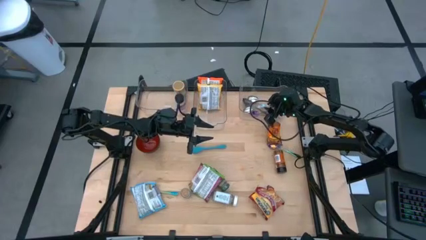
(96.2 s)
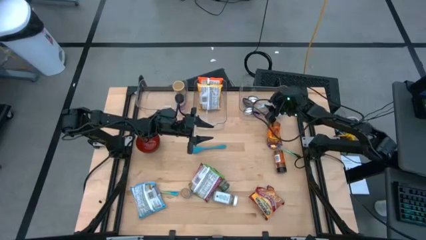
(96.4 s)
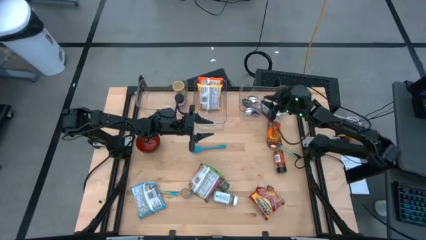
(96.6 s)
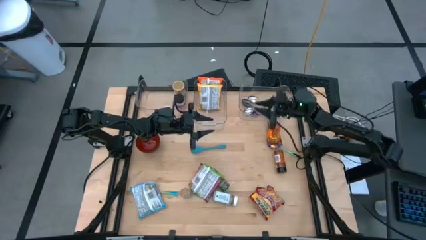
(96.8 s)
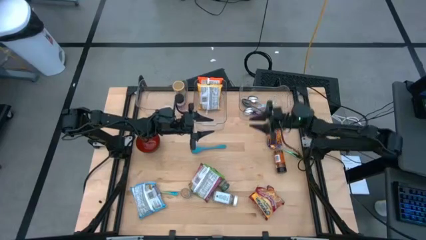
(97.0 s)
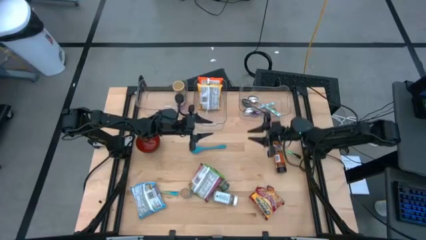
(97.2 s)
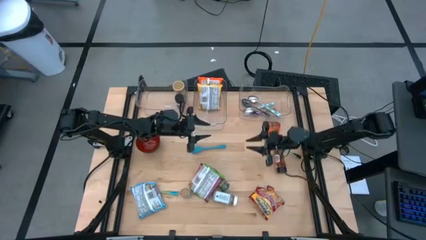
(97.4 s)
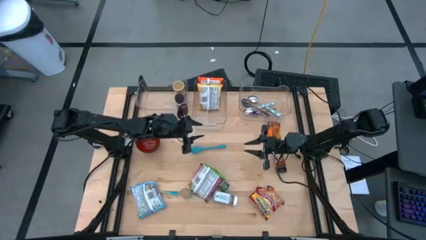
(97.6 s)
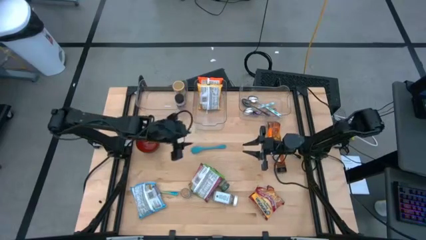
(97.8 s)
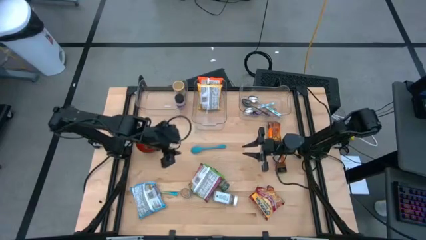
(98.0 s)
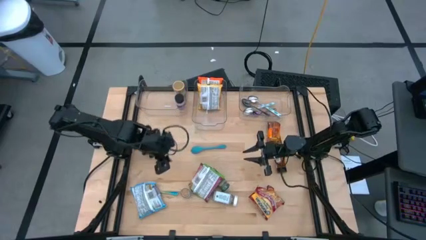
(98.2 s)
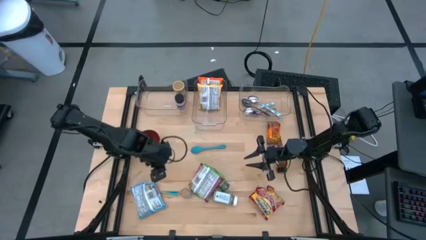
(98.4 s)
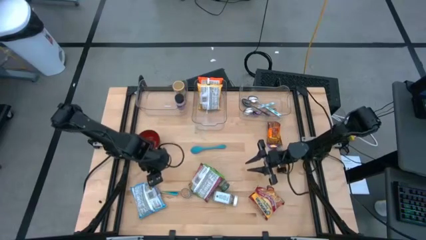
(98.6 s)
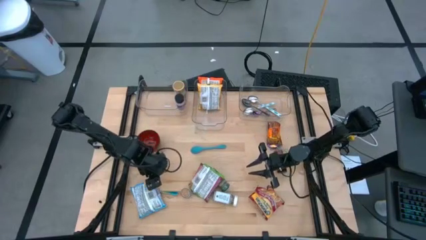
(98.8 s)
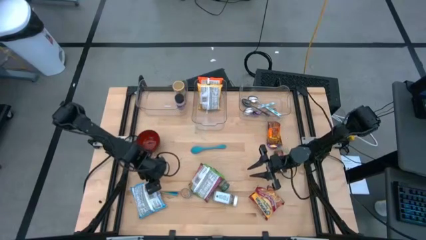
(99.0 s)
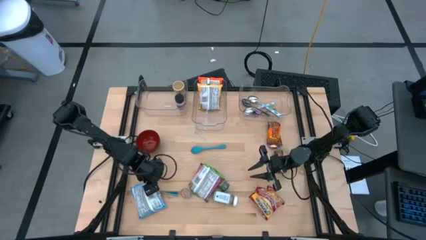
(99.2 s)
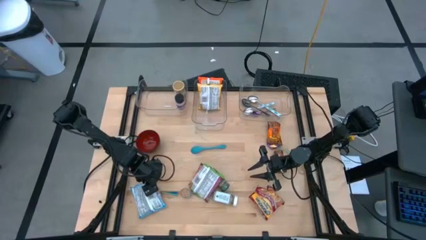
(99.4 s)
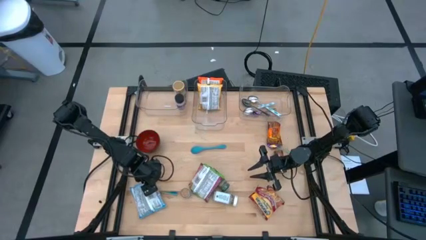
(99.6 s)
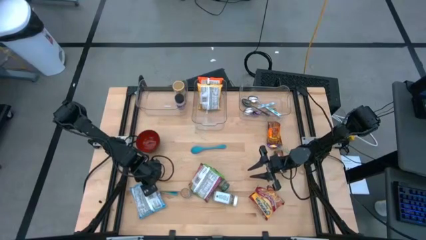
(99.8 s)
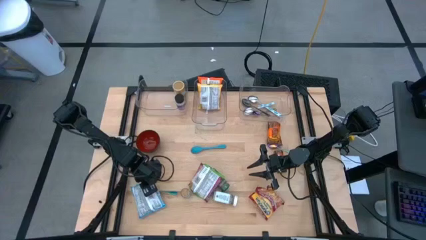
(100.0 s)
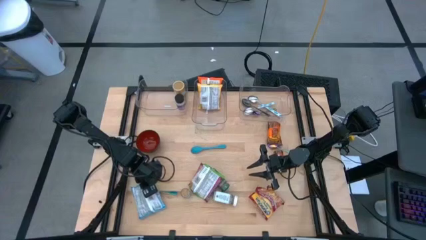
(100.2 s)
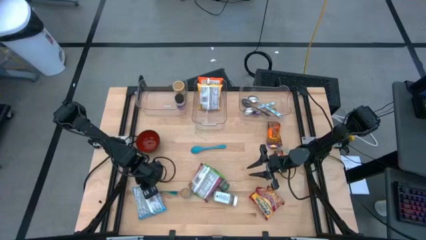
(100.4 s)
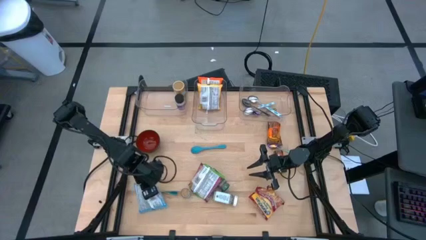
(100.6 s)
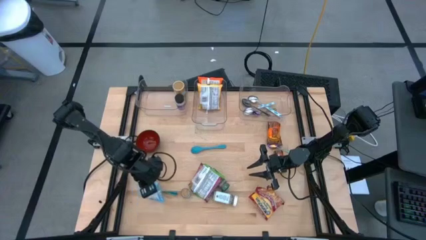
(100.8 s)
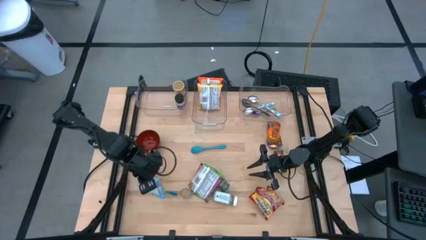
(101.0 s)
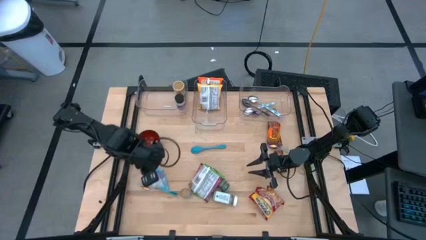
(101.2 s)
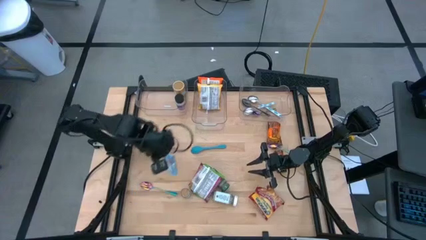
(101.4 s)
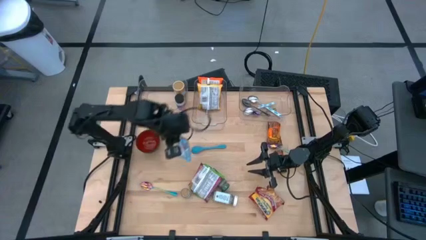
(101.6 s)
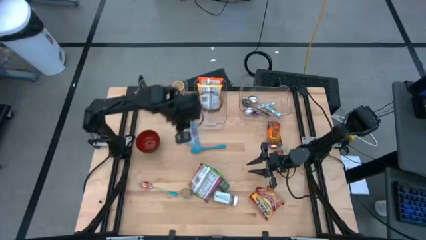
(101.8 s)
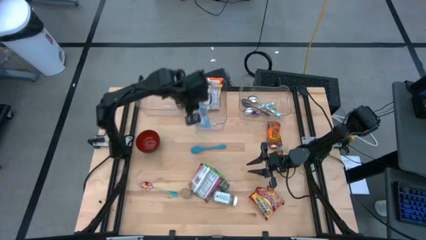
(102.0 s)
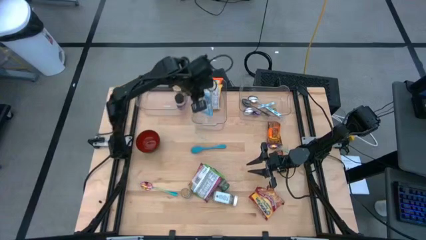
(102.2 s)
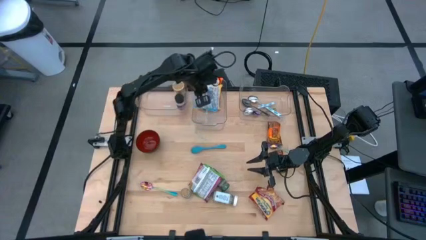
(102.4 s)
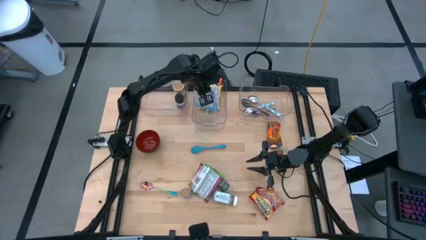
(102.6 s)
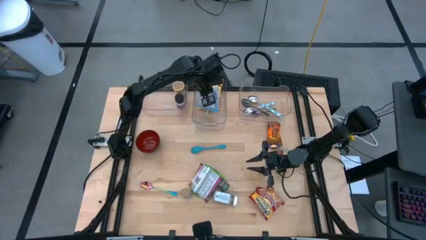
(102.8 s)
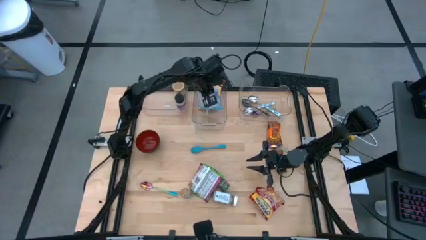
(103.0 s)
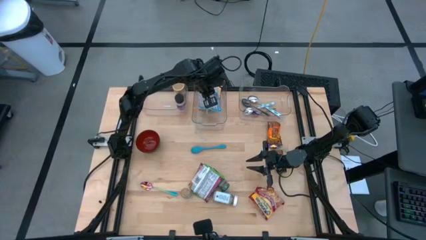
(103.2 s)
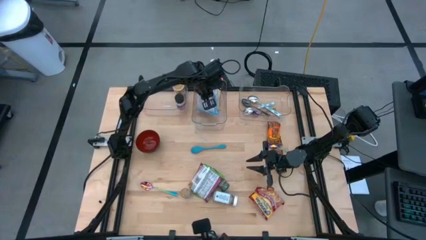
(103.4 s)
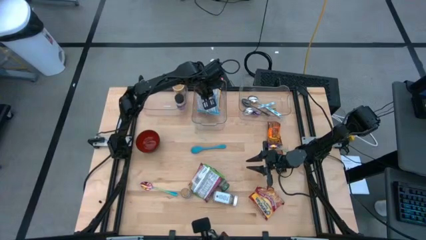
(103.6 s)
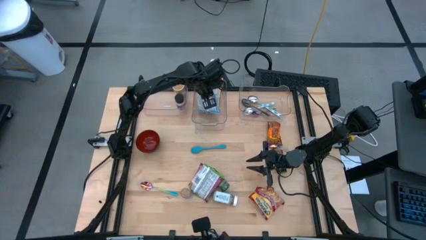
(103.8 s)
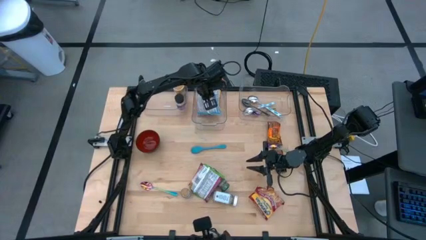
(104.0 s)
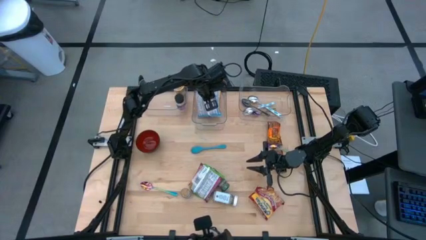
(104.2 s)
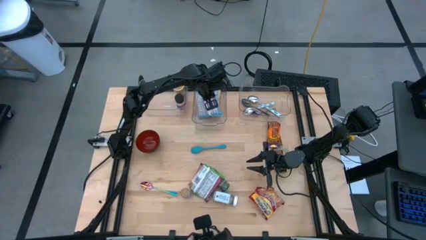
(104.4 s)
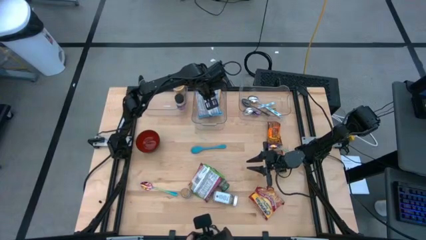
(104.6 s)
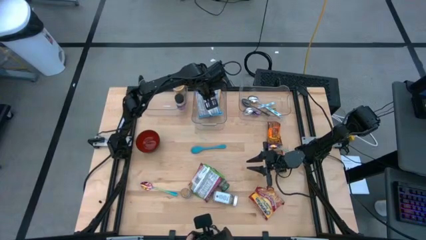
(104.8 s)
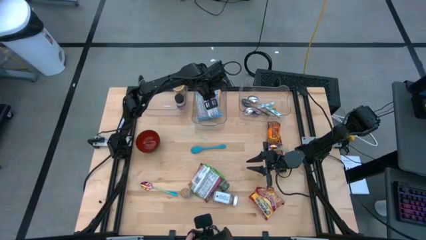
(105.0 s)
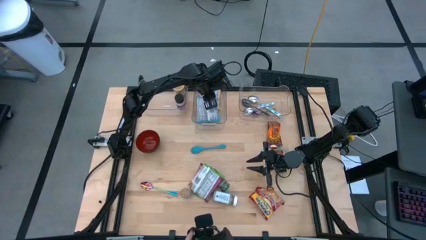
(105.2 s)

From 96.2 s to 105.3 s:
Task: Pick & Place Food Item
Put the blue noodle pack into the middle transparent bin

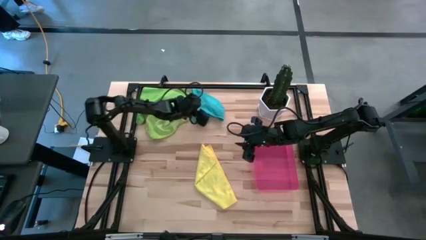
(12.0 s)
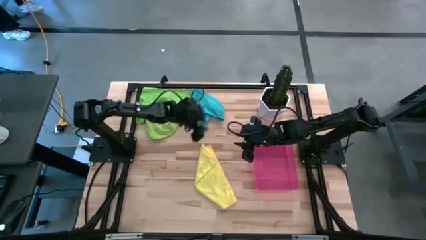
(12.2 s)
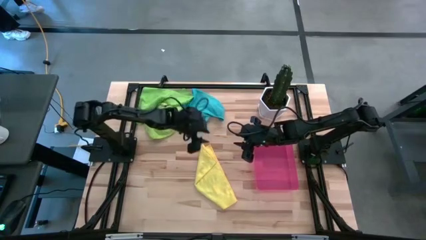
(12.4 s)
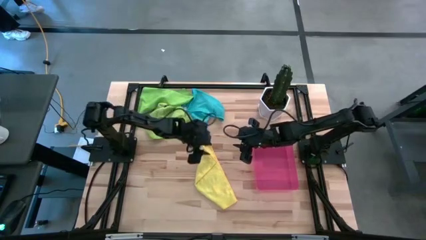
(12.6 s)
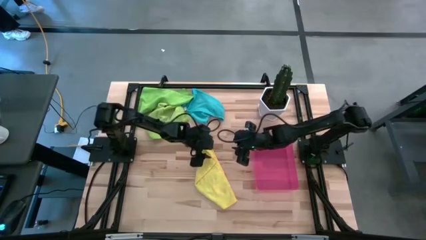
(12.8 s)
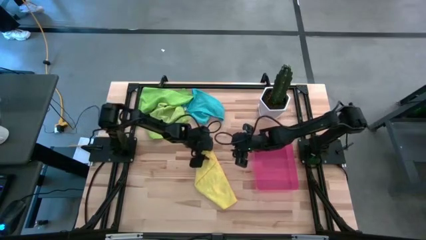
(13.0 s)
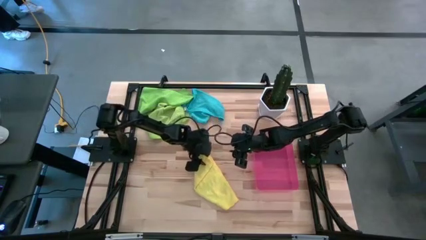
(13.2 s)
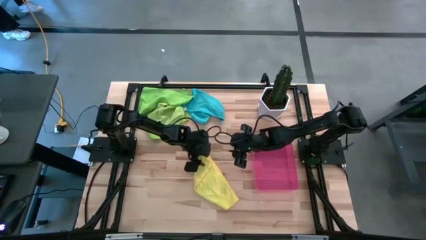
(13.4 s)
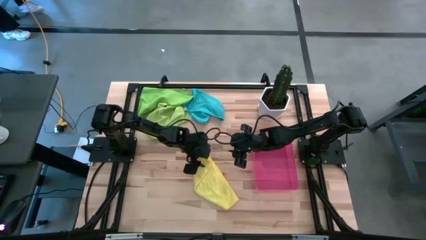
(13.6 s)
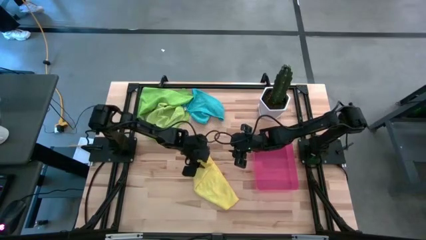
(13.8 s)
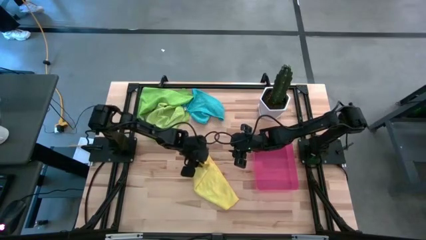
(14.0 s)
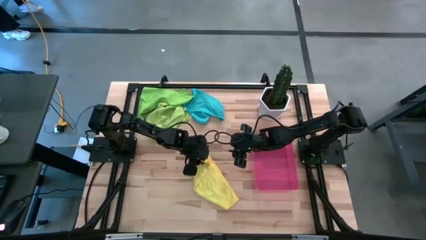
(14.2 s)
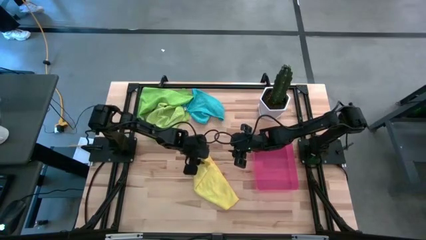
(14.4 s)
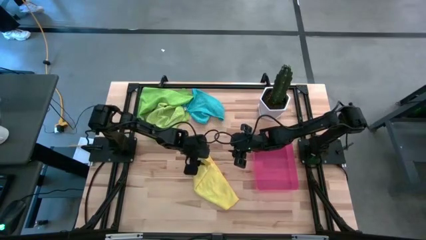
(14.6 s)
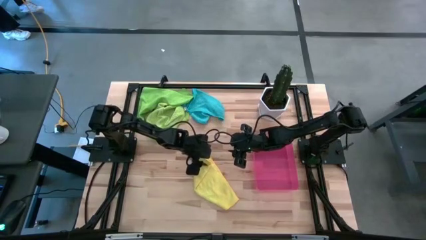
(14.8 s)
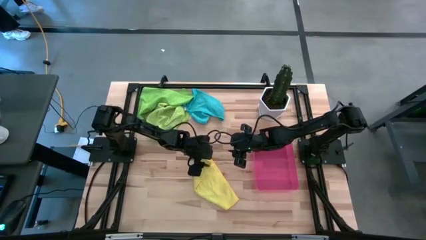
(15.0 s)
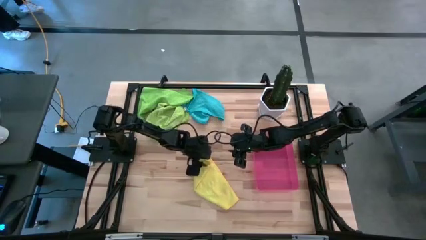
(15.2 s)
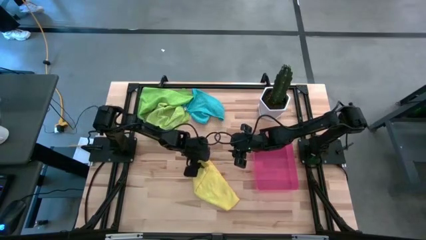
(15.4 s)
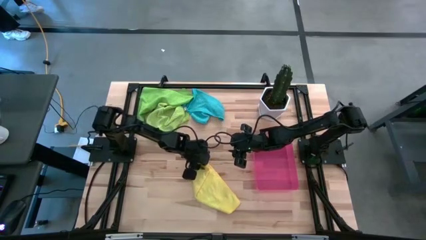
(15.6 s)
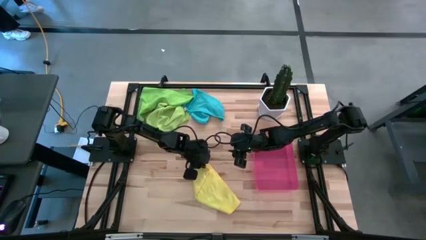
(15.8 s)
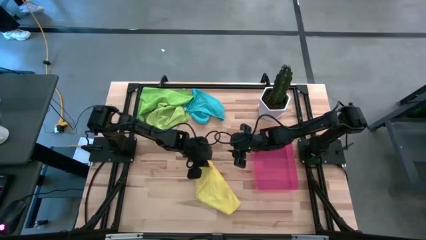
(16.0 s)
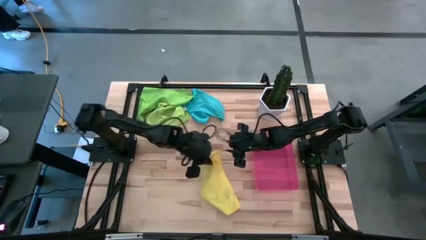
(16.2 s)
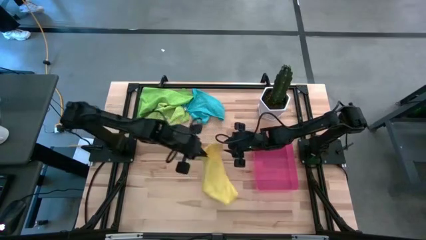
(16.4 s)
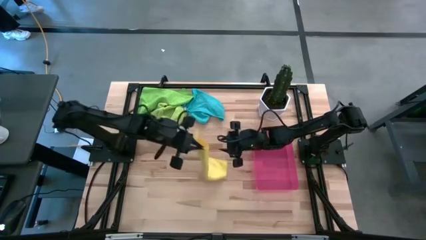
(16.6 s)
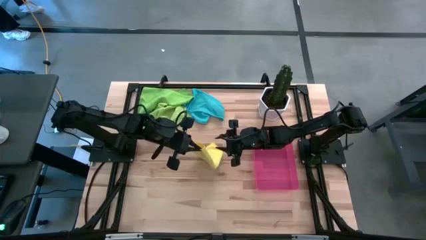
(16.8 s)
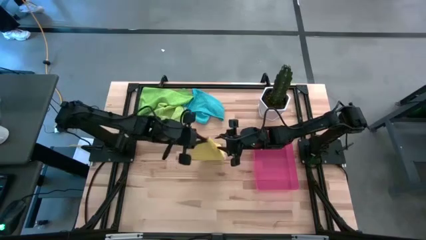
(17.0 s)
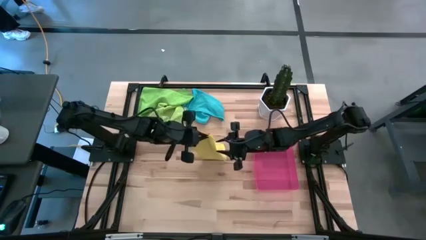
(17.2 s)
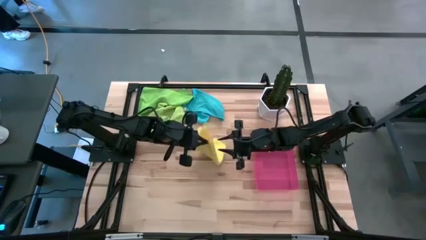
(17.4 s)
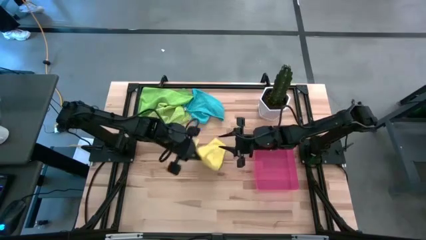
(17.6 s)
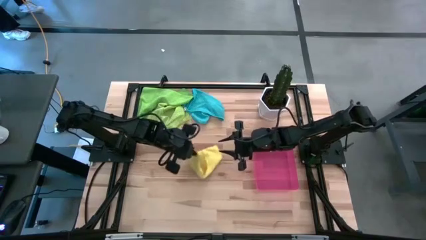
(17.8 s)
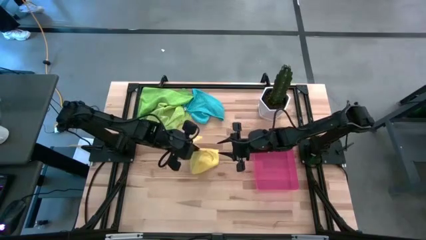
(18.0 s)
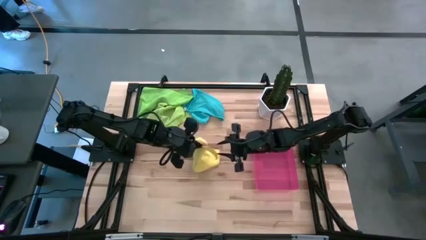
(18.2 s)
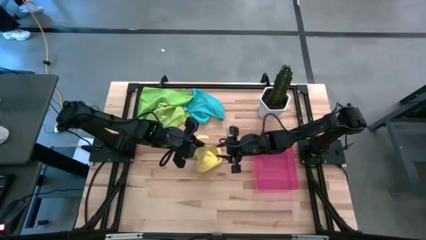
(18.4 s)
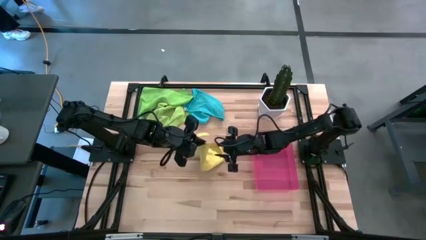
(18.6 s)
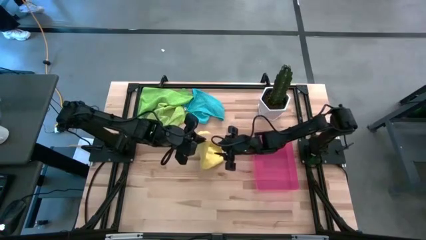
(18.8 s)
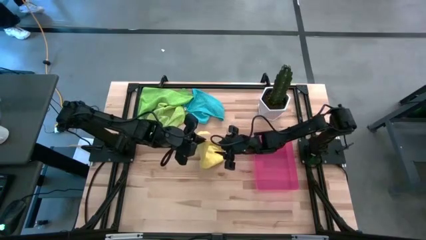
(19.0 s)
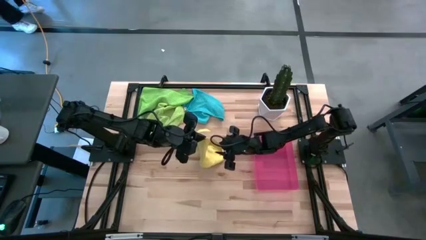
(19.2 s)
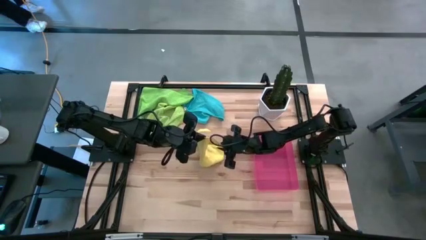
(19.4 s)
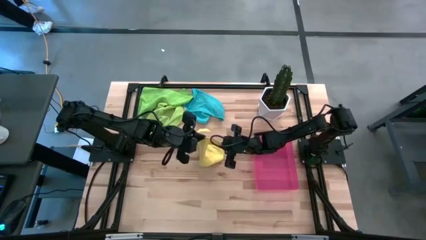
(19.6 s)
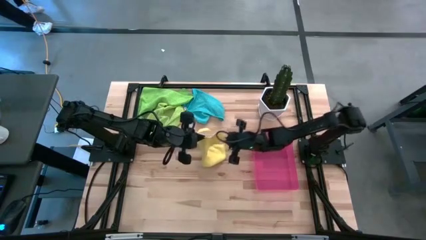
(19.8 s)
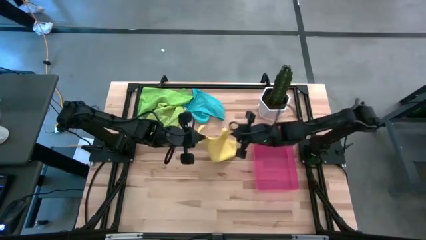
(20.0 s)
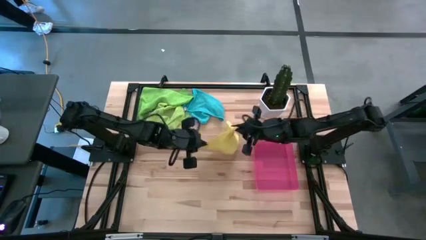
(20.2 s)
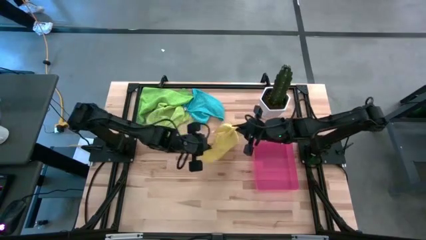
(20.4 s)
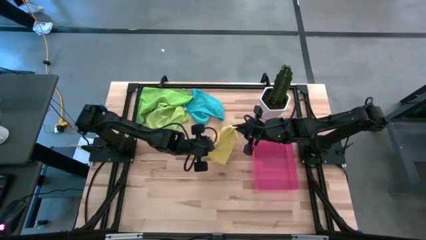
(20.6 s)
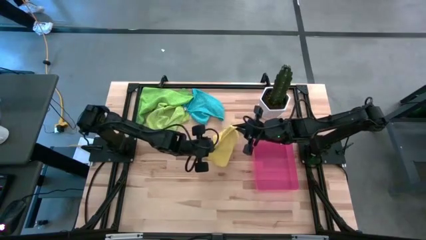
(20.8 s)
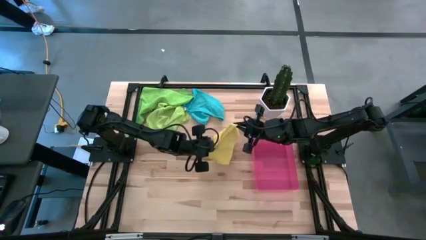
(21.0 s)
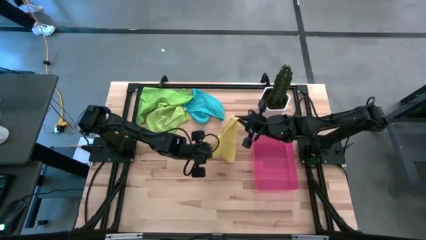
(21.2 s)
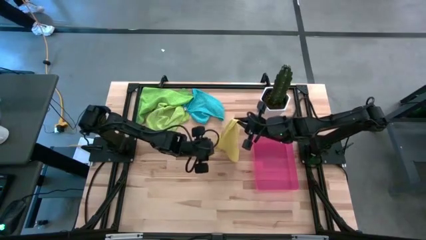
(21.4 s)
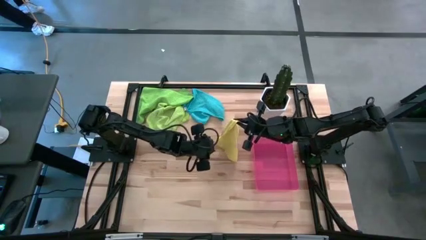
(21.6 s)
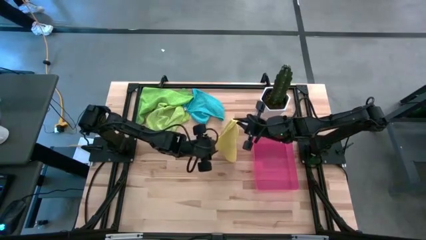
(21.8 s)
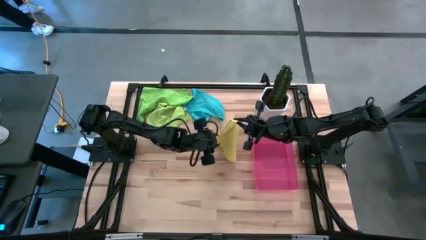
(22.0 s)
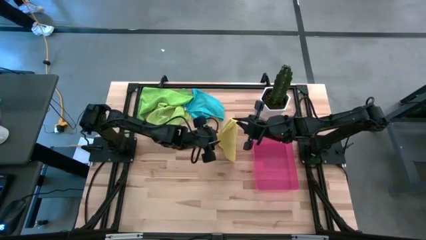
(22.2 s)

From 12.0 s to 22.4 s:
Task: Roll microfiber towels into tight, uniform cylinder then place into a basket
Fold the yellow microfiber towel
